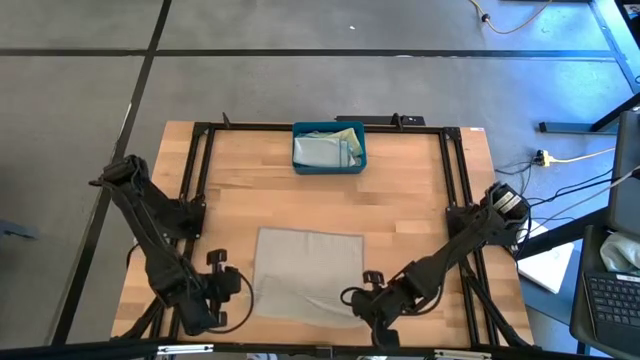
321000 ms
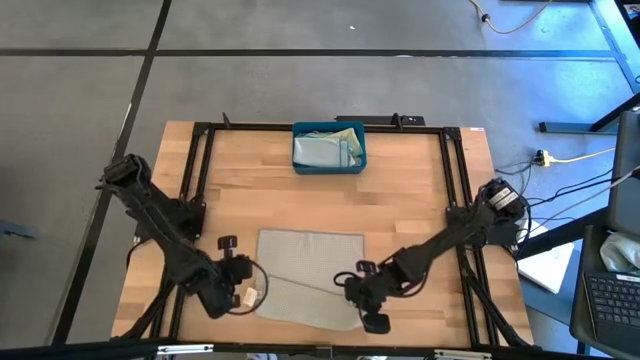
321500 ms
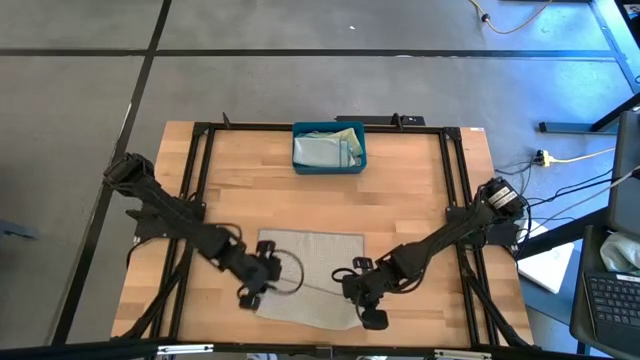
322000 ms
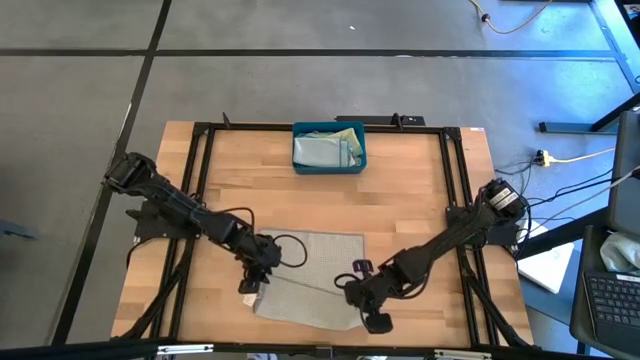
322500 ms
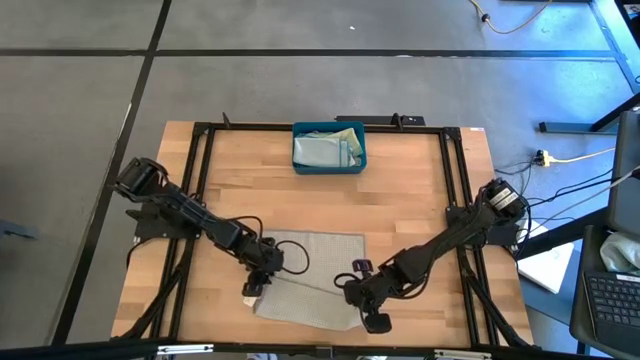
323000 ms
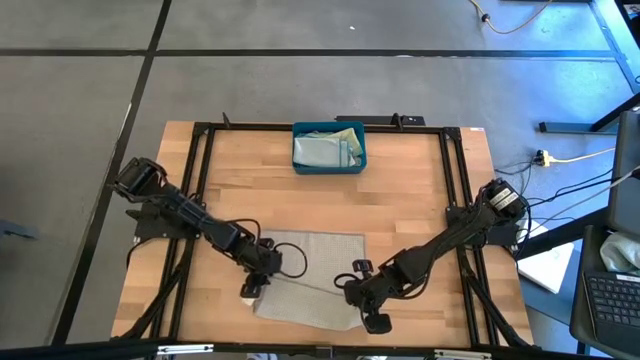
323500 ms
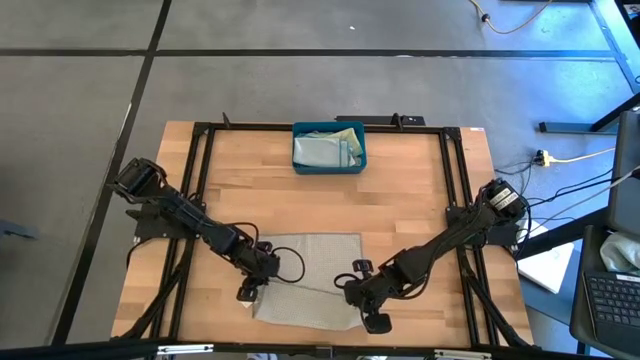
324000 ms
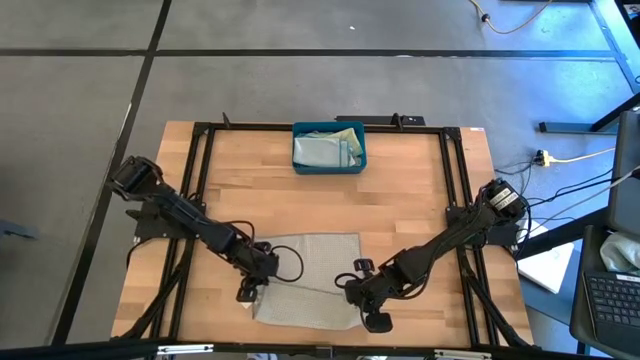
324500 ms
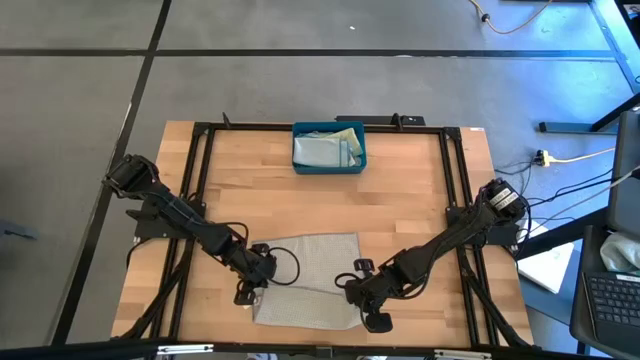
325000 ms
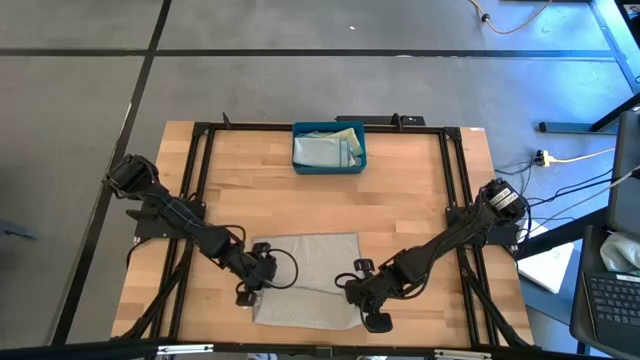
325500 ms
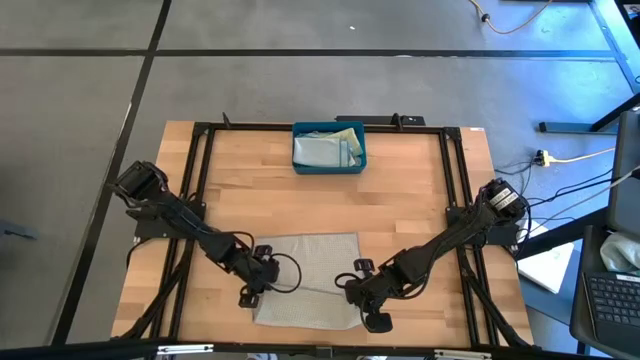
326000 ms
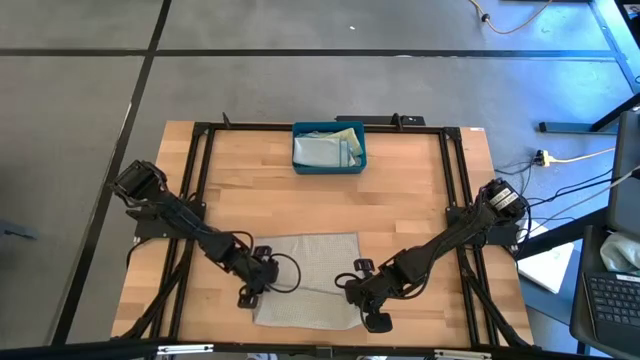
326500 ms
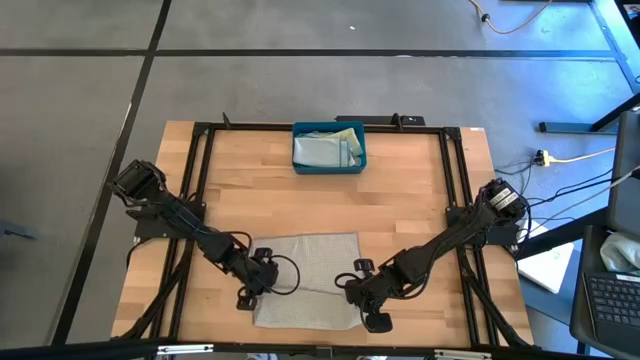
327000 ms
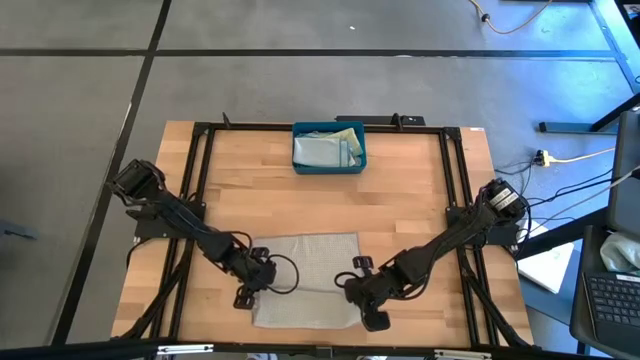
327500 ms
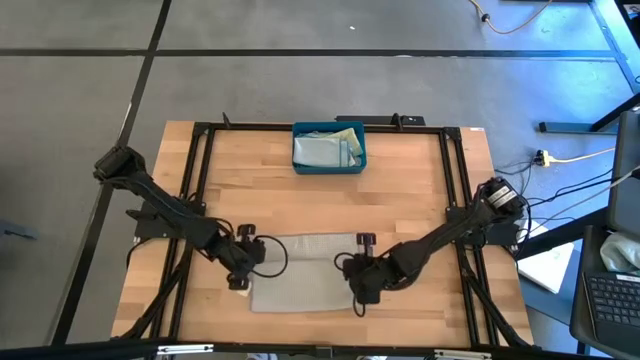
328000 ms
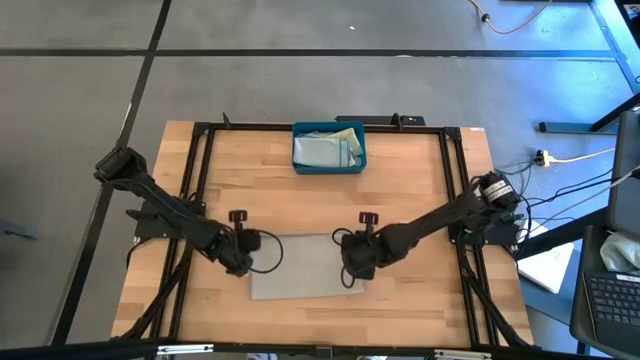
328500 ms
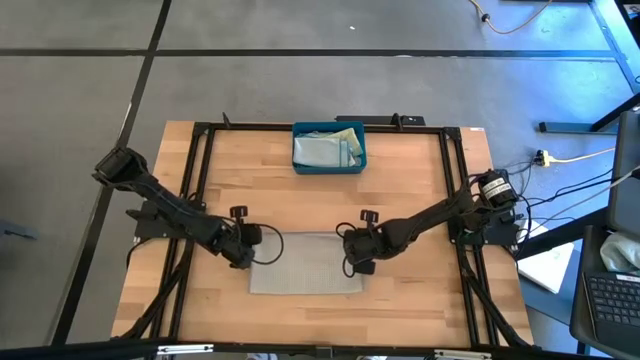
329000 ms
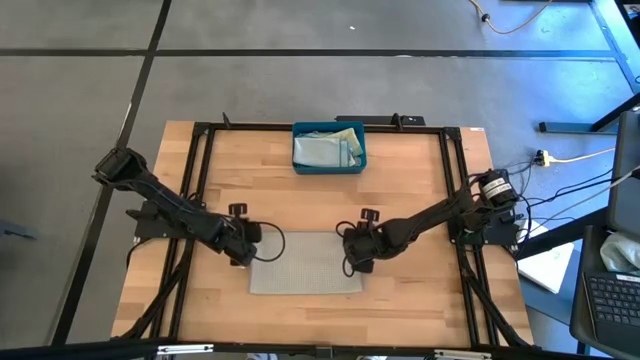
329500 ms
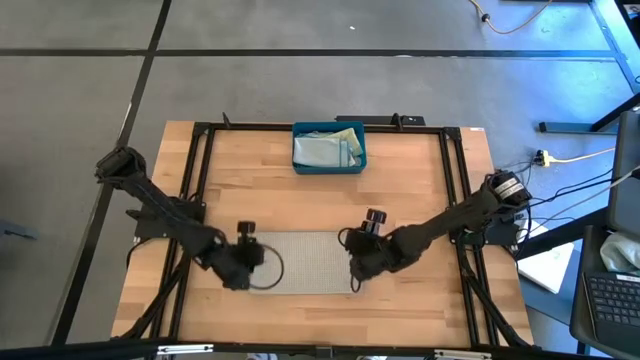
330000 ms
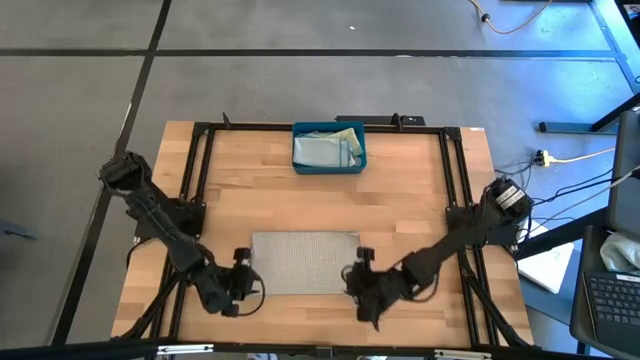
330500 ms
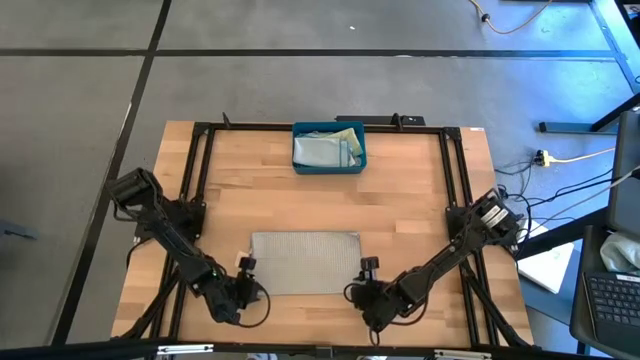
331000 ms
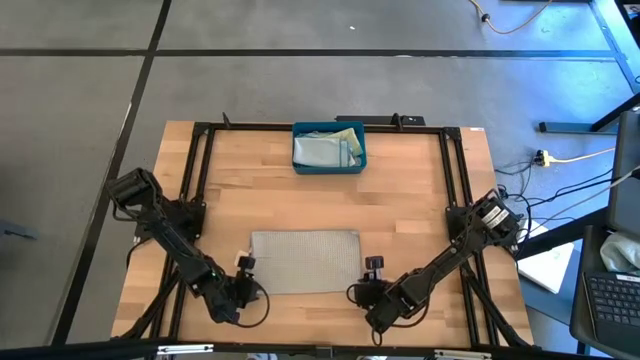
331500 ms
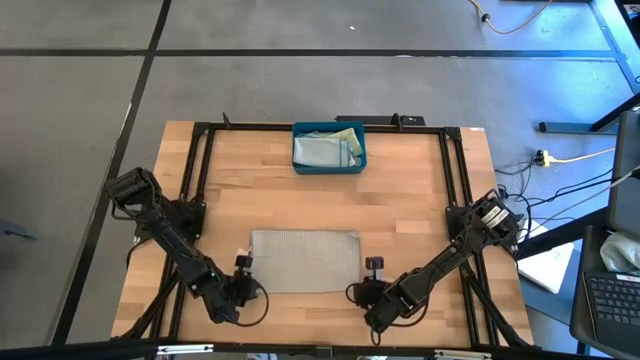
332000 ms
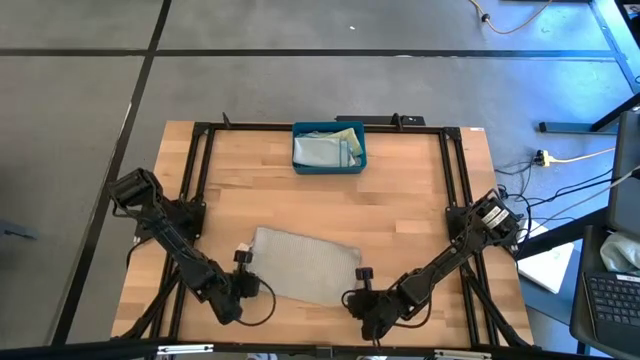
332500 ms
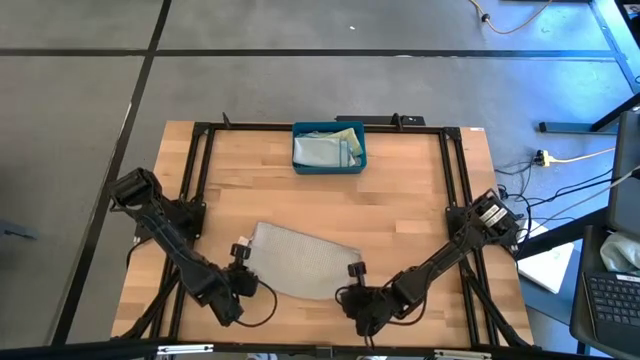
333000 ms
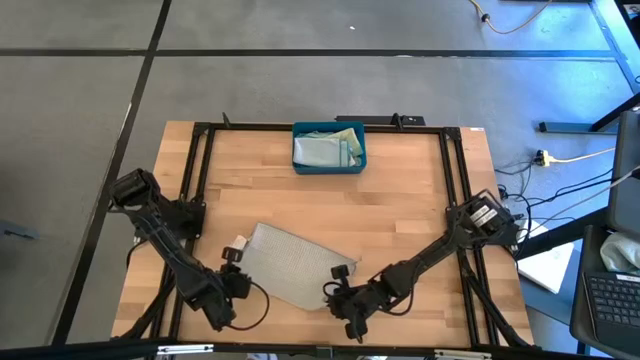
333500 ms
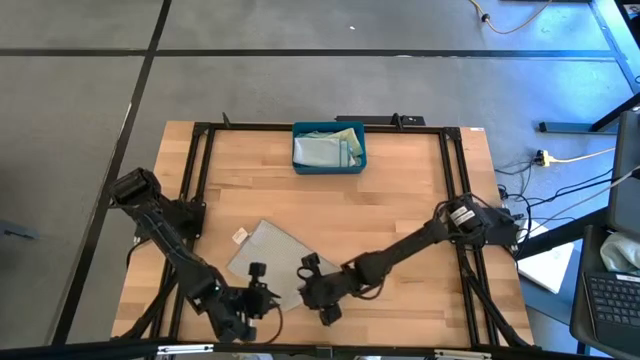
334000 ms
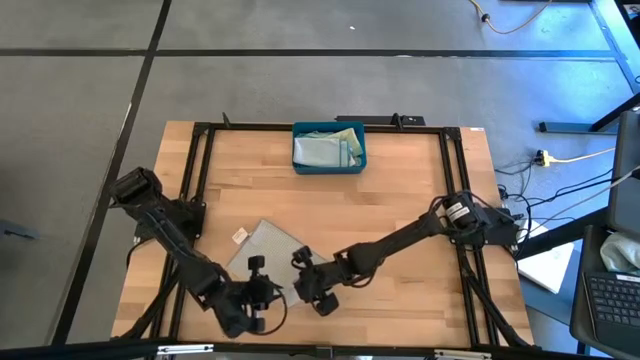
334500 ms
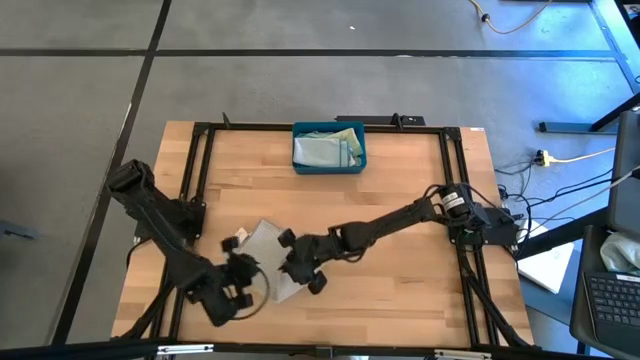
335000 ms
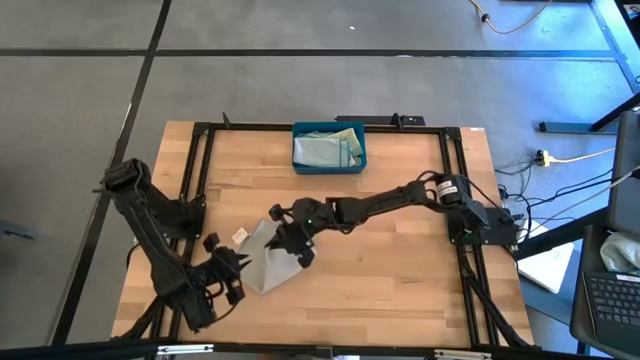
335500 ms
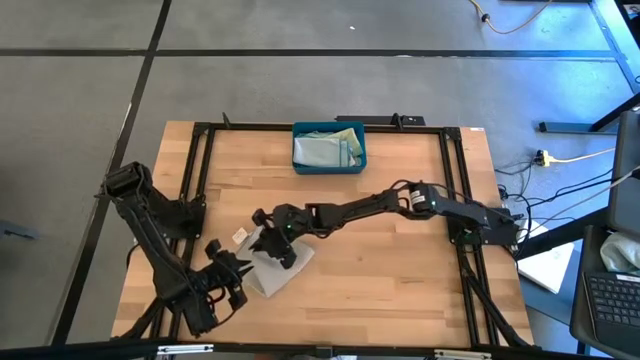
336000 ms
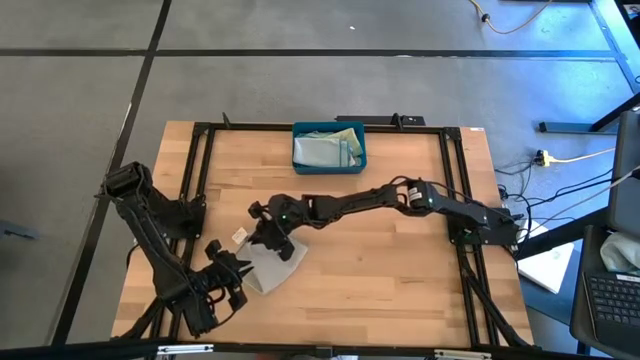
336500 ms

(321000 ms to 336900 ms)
Task: Fold microfiber towels
Fold the gray towel

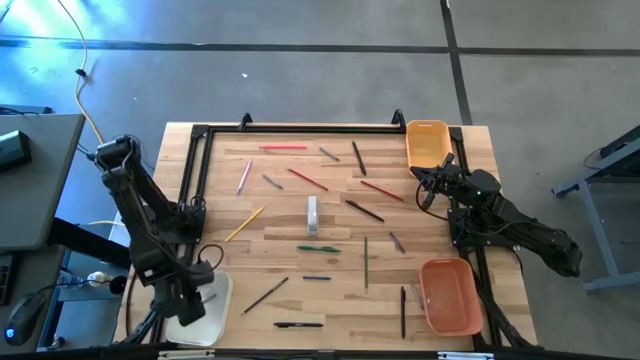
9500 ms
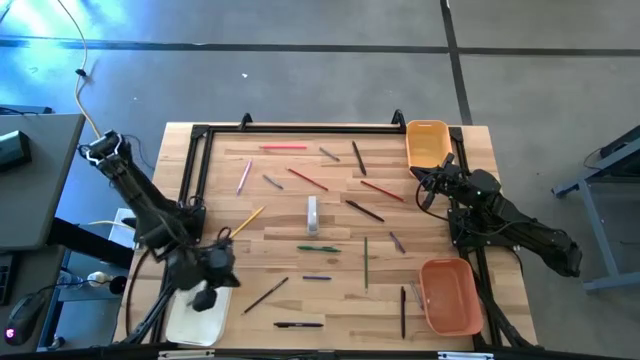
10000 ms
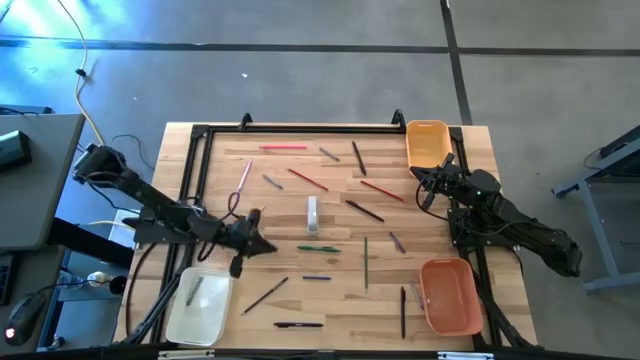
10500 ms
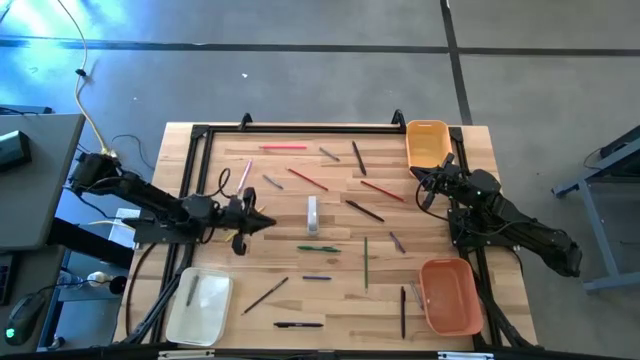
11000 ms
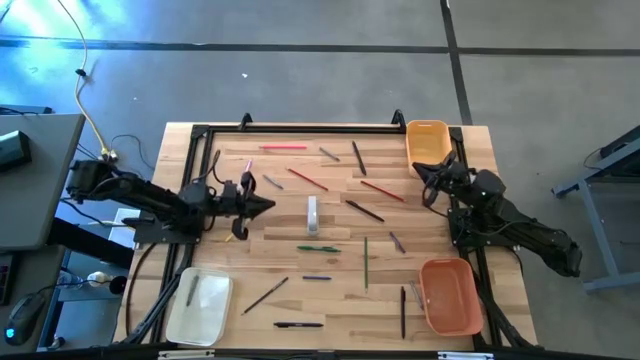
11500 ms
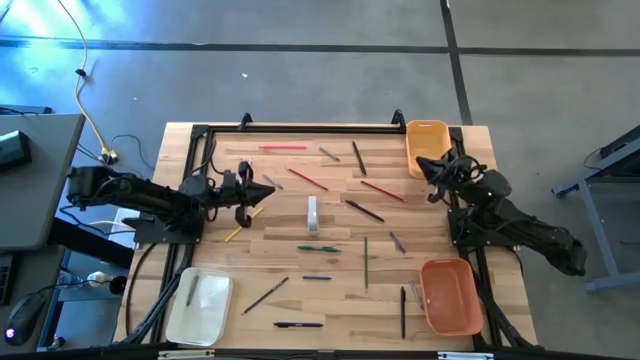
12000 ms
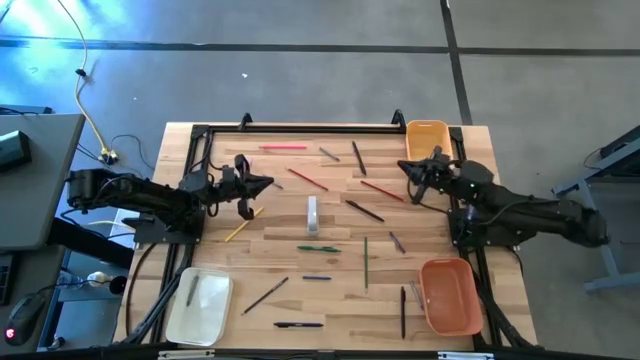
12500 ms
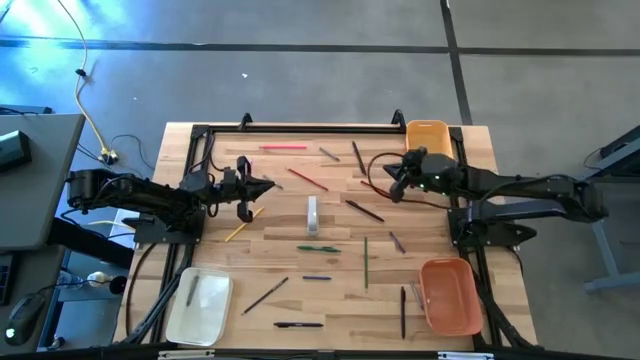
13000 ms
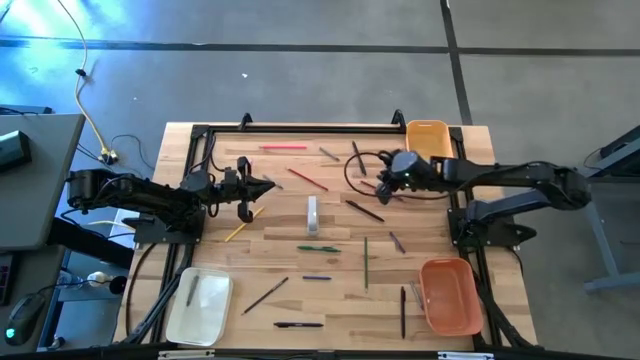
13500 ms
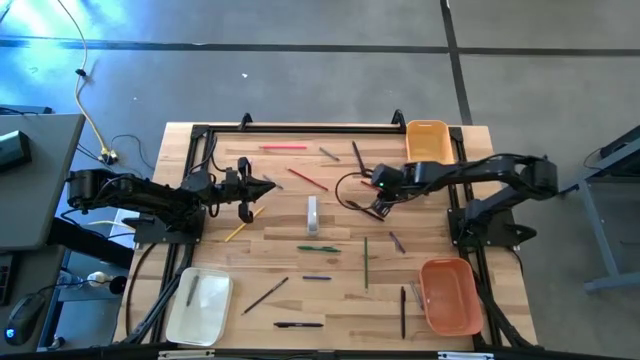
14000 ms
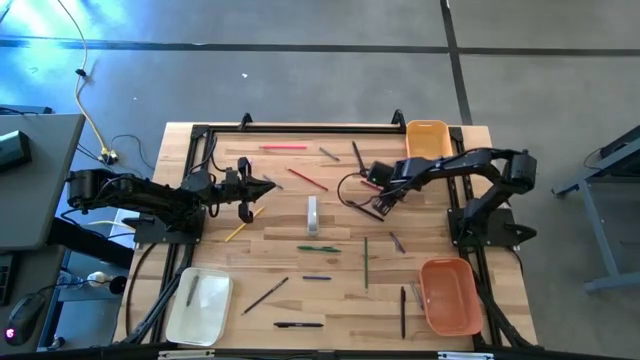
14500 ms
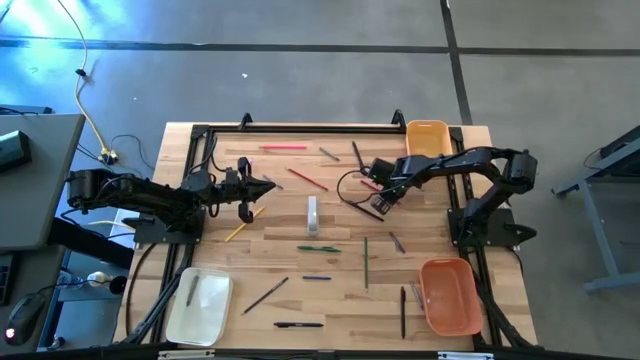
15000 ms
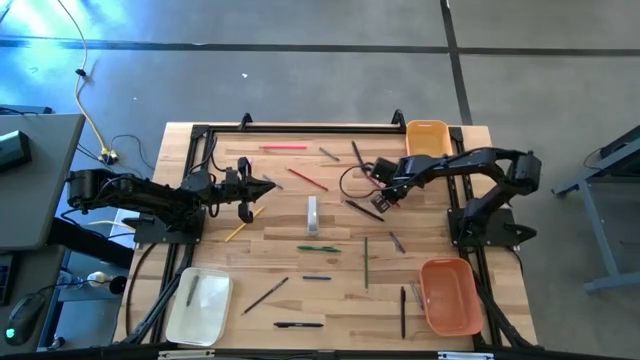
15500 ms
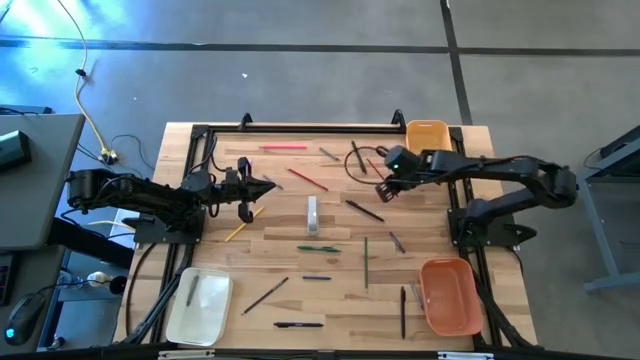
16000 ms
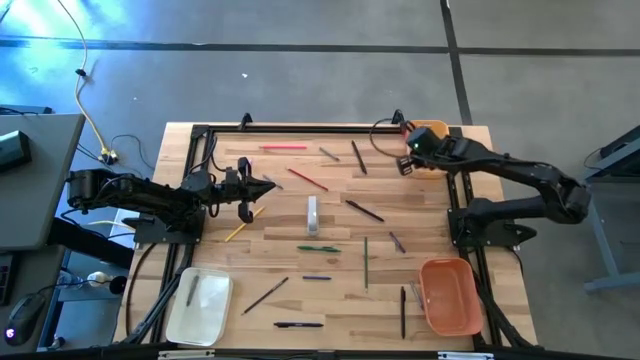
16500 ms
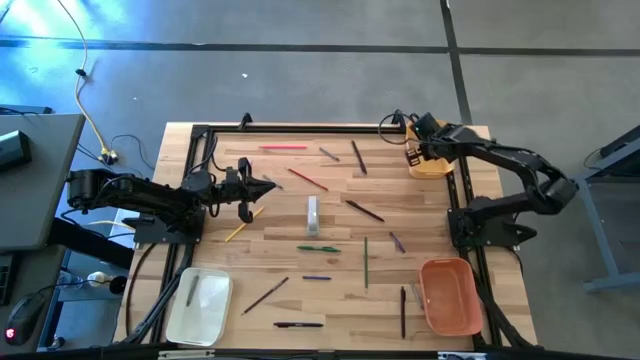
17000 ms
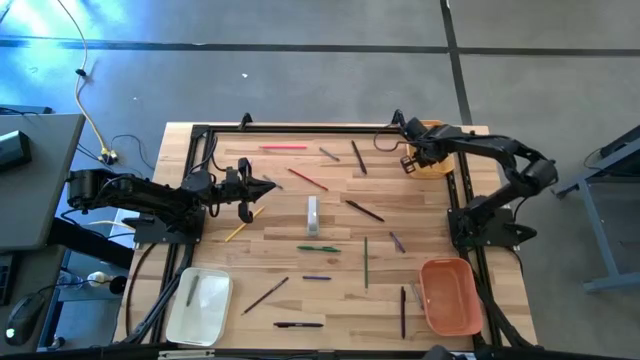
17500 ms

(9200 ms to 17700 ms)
Task: Sort crayons/erasers/pens/pencils in bins
Put the red pencil into the yellow bin
